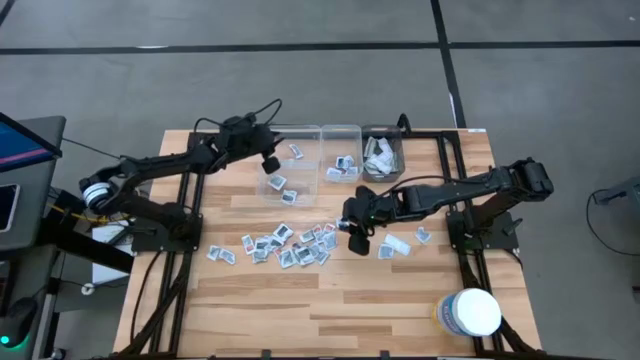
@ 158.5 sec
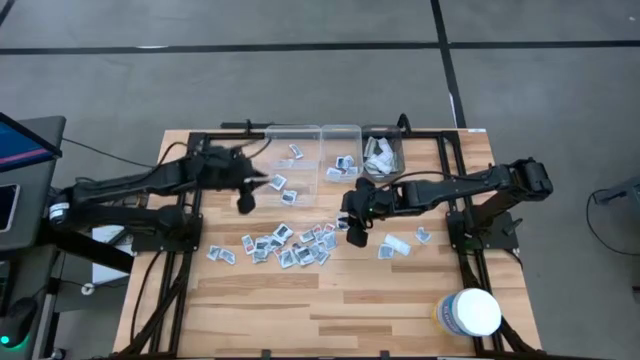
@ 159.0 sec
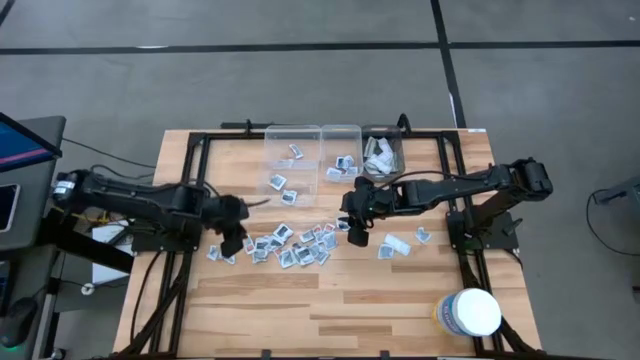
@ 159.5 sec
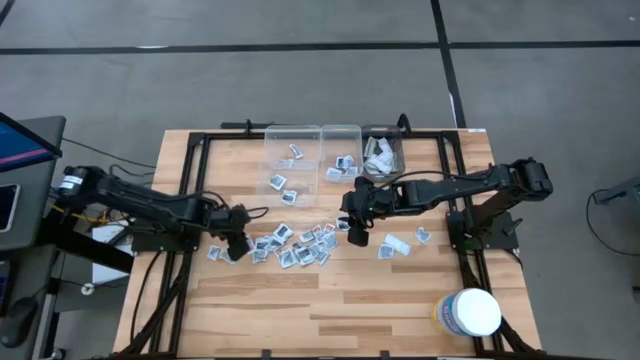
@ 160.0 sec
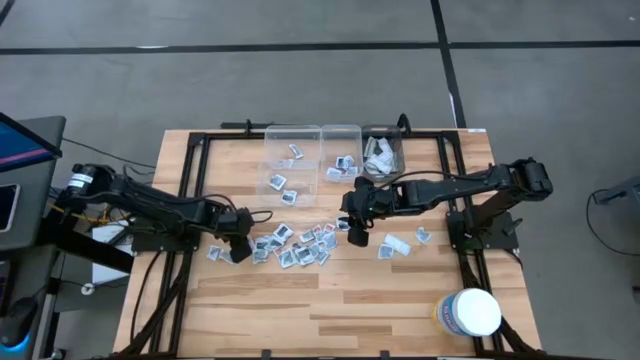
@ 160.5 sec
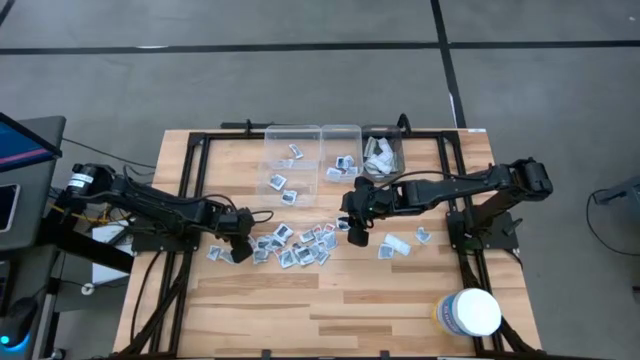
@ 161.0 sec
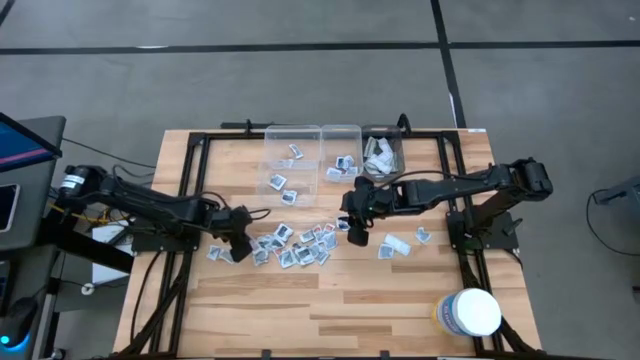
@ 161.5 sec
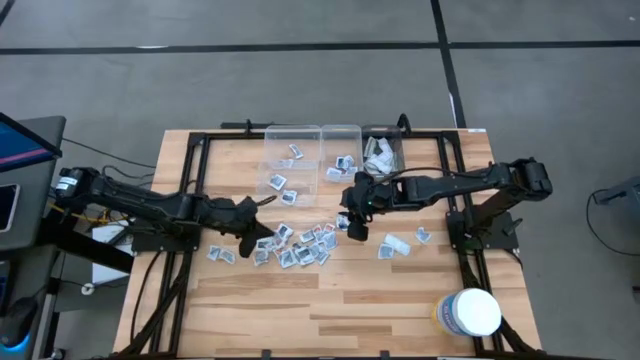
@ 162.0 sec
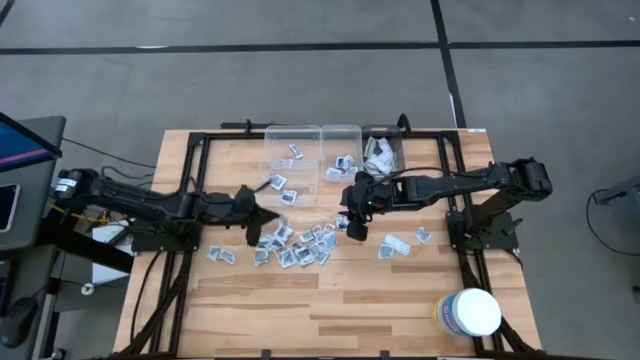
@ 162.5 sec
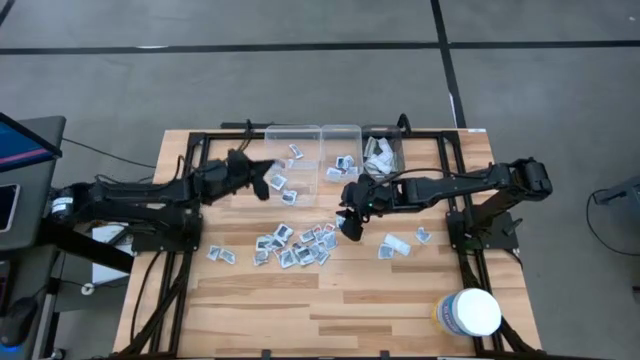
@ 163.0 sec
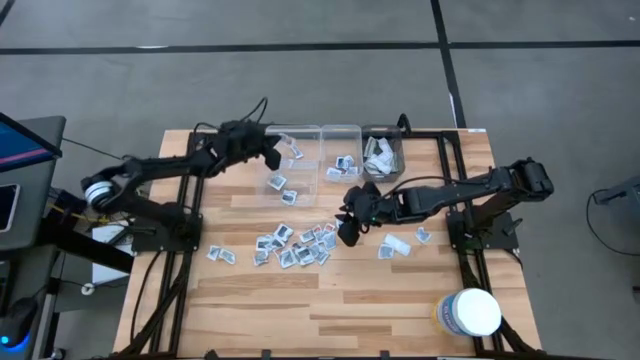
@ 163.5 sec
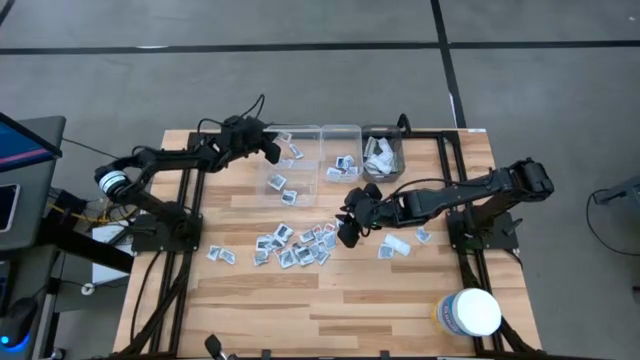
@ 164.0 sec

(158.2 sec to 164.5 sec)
Task: Pick & Place First Aid Supplies
Put the ointment pack into the top left transparent bin

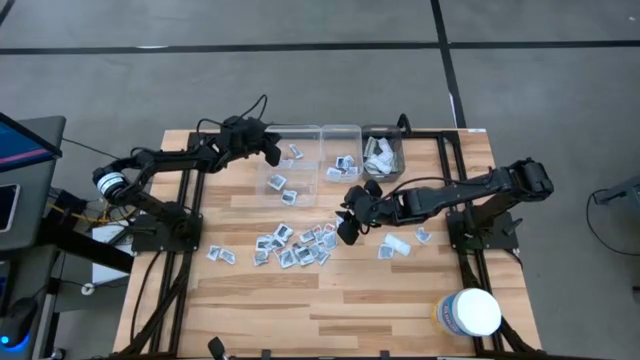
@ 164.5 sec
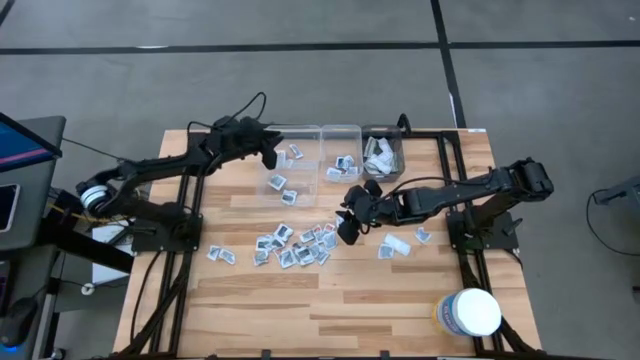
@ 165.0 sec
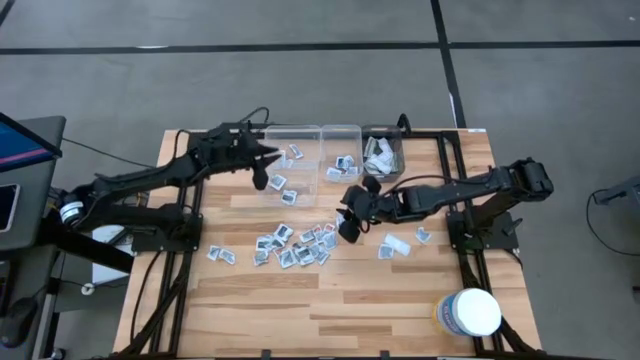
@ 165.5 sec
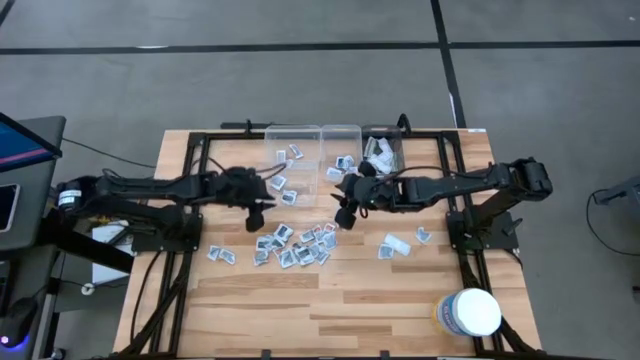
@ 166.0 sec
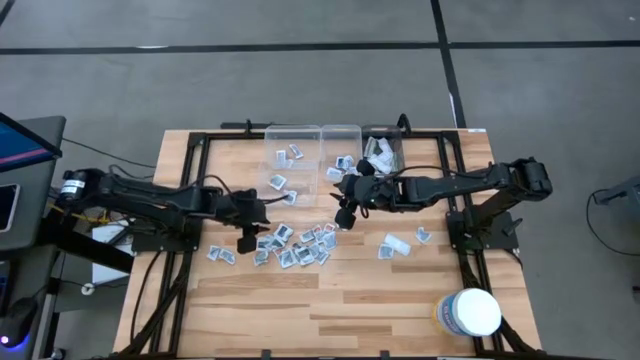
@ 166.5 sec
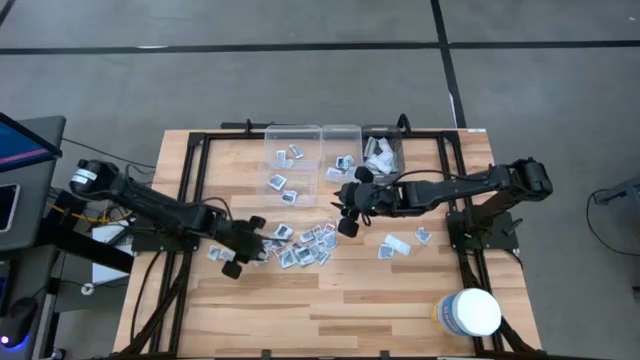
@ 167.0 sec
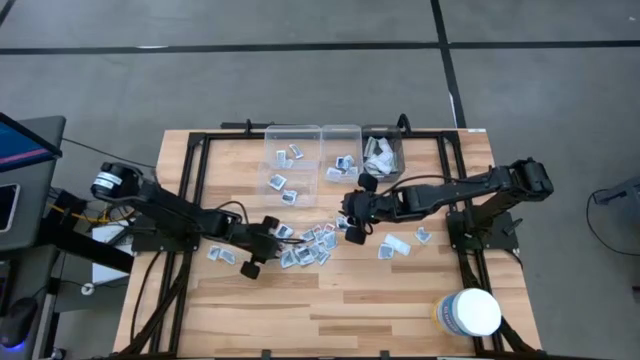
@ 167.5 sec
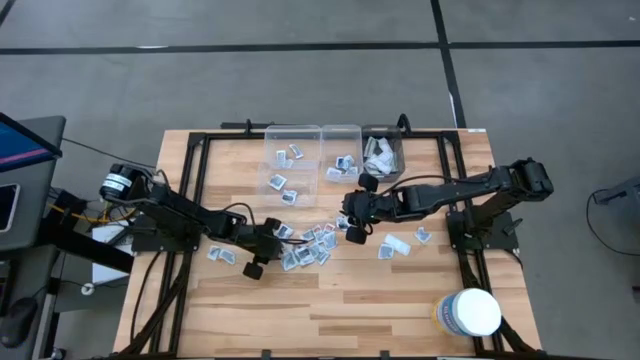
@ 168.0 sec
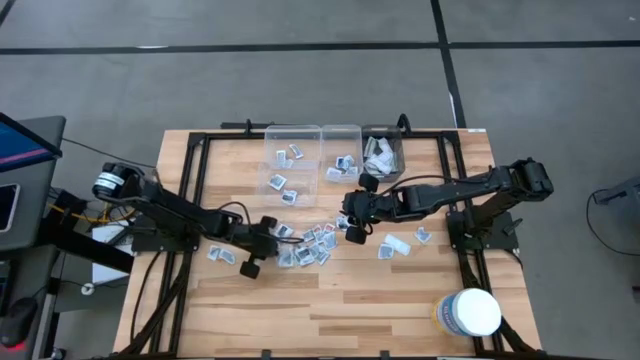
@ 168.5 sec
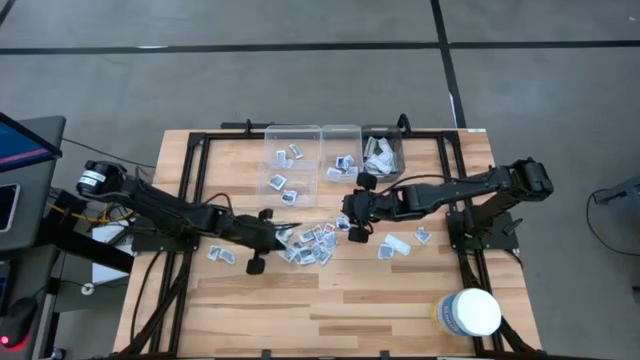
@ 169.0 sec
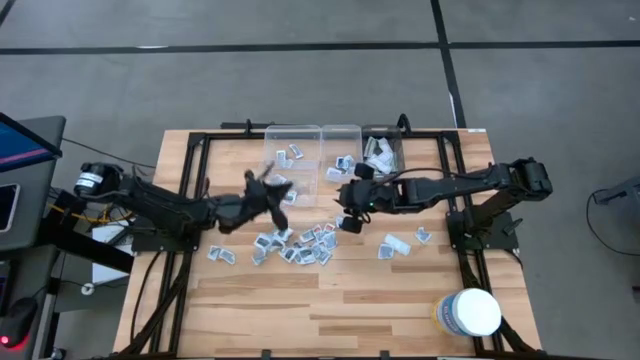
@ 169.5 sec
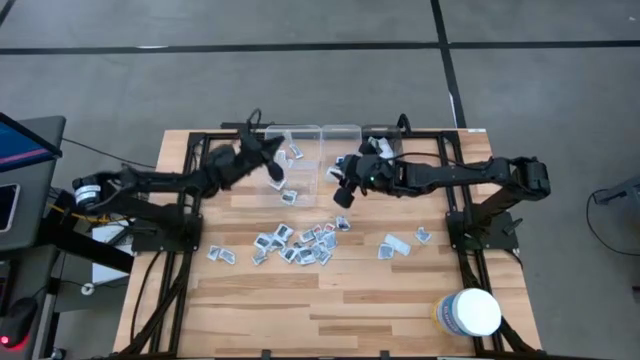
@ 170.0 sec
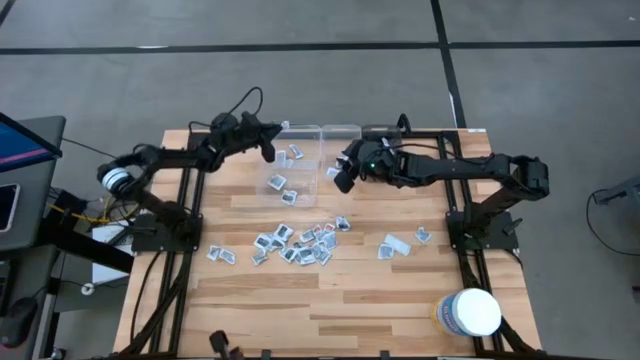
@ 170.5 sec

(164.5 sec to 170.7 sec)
Put the ointment pack into the top left transparent bin

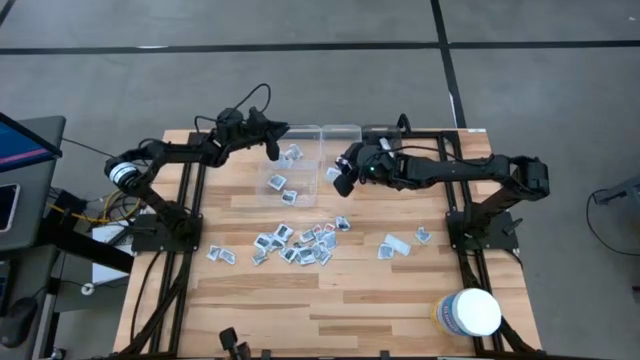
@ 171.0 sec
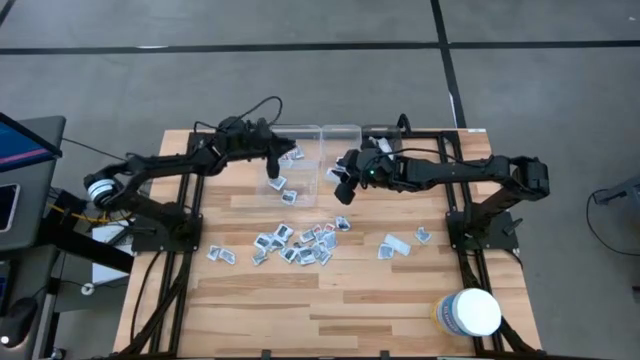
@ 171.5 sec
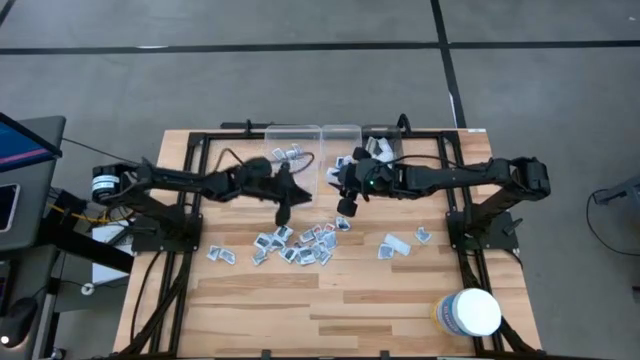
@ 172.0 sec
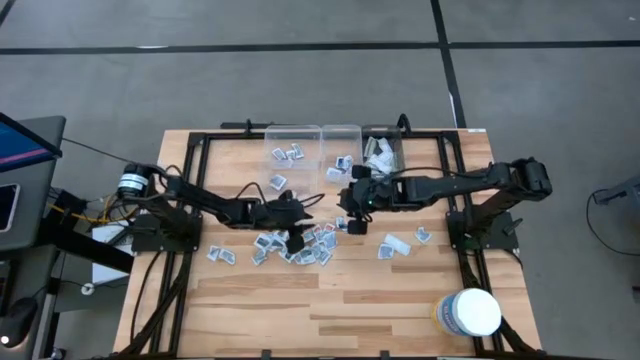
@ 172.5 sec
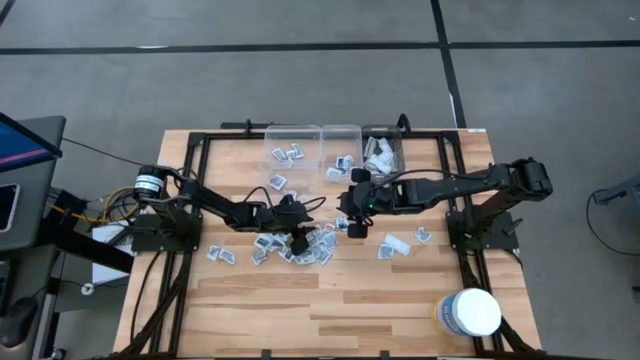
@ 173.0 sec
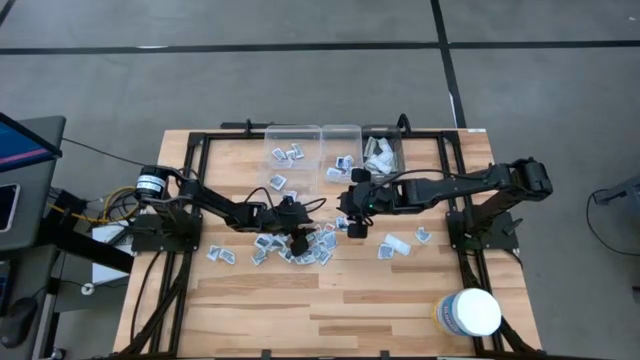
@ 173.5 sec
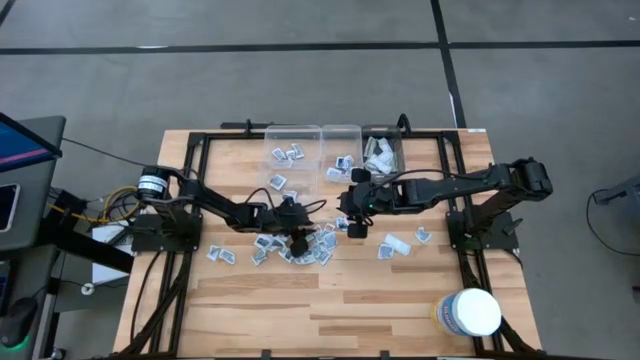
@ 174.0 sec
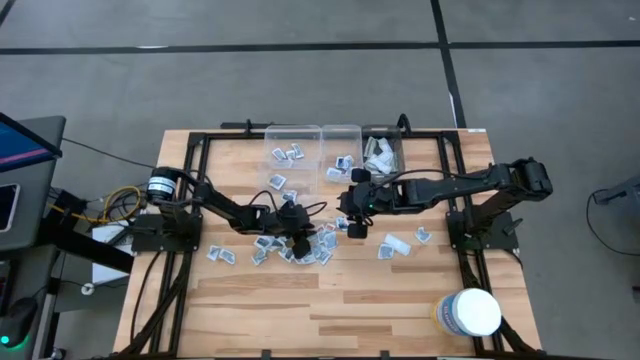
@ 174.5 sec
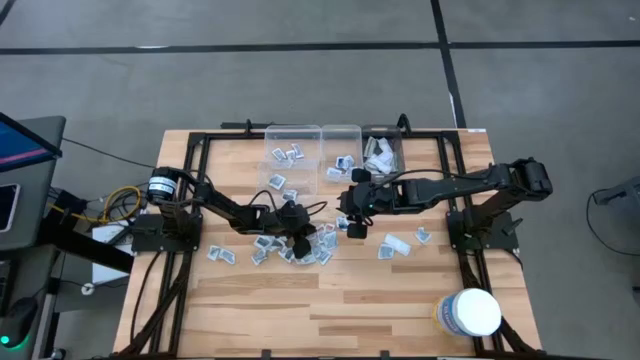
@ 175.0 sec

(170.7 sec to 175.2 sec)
Put the ointment pack into the top left transparent bin

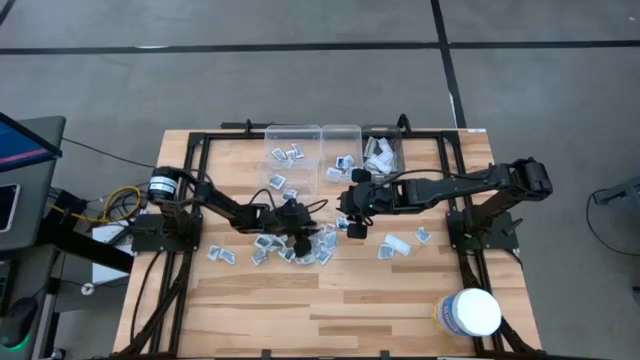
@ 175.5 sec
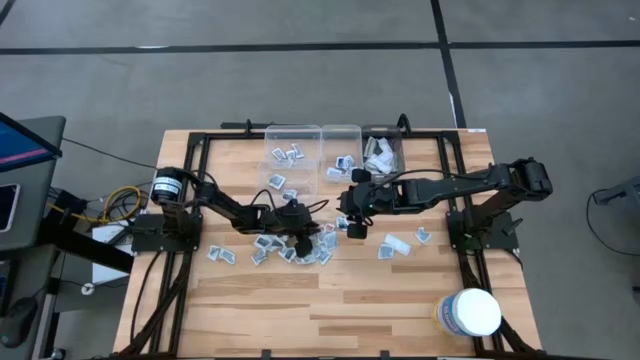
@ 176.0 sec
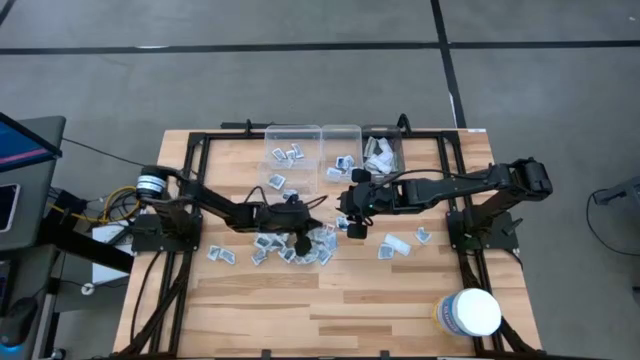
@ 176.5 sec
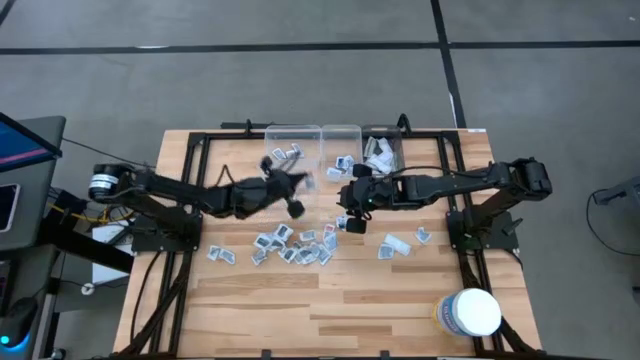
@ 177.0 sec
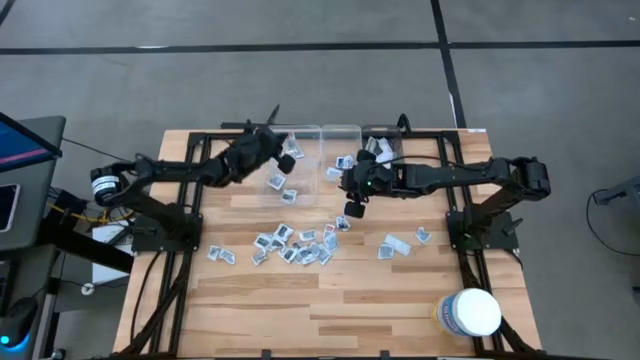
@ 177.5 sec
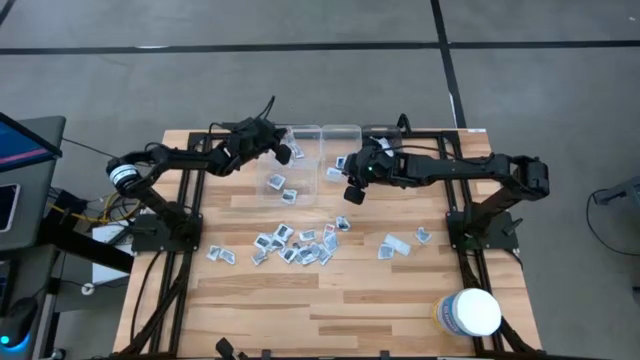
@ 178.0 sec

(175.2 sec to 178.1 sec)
Put the ointment pack into the top left transparent bin
